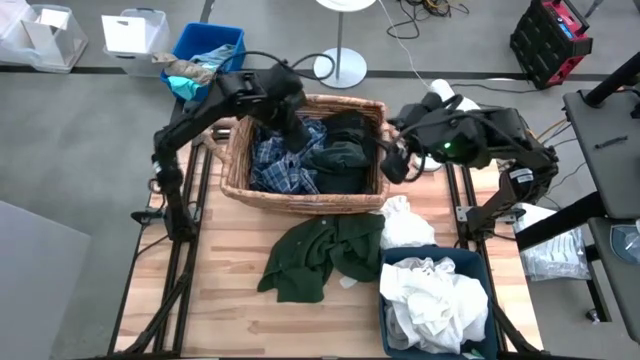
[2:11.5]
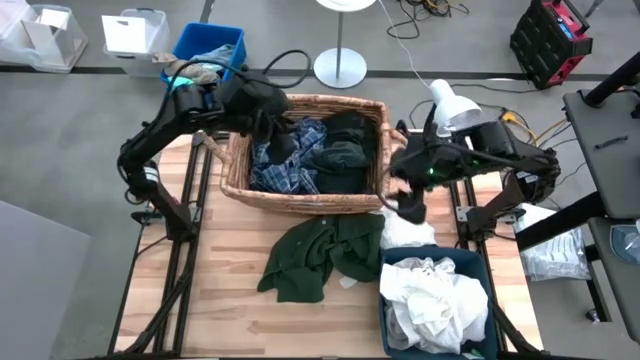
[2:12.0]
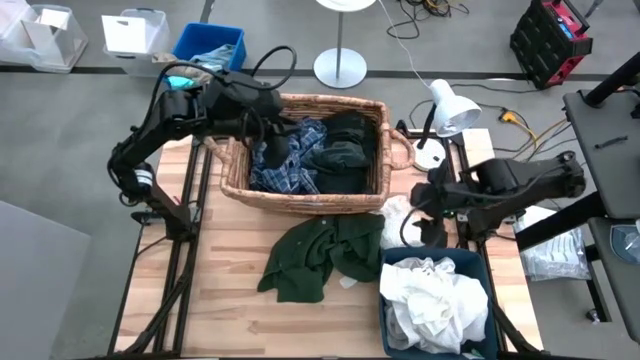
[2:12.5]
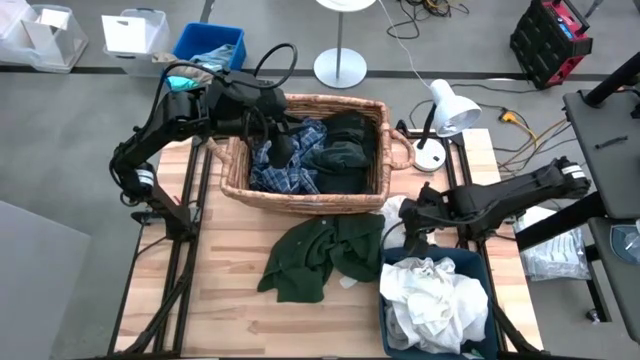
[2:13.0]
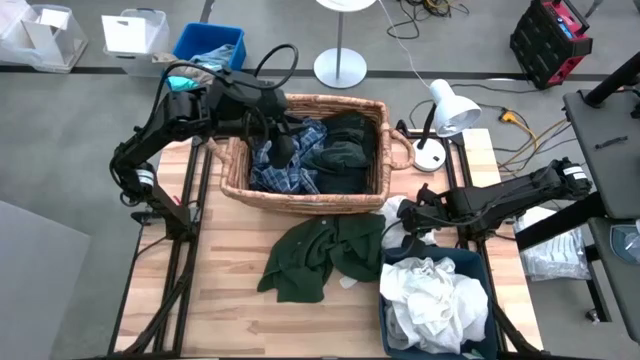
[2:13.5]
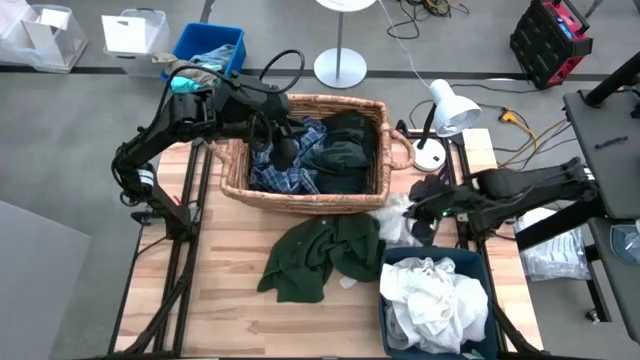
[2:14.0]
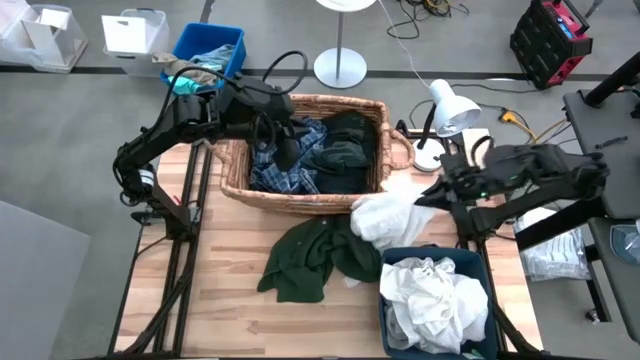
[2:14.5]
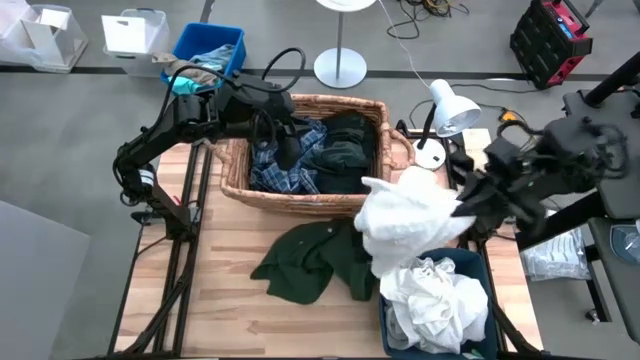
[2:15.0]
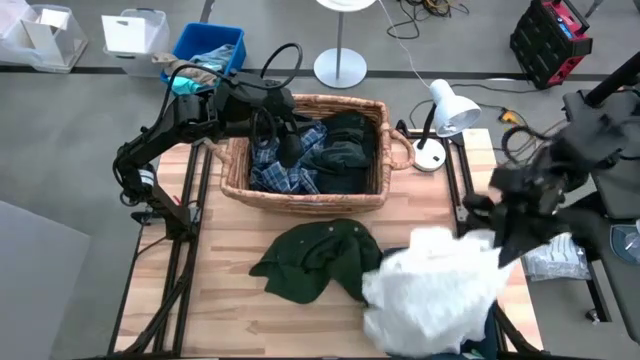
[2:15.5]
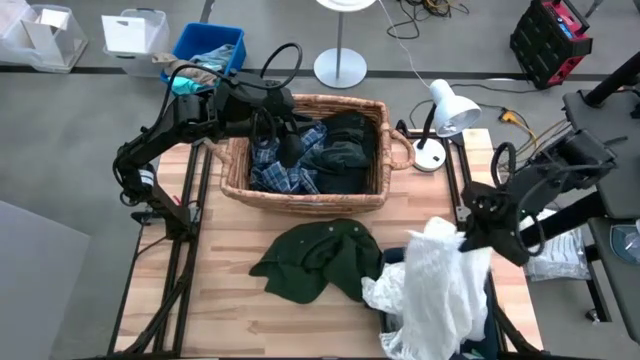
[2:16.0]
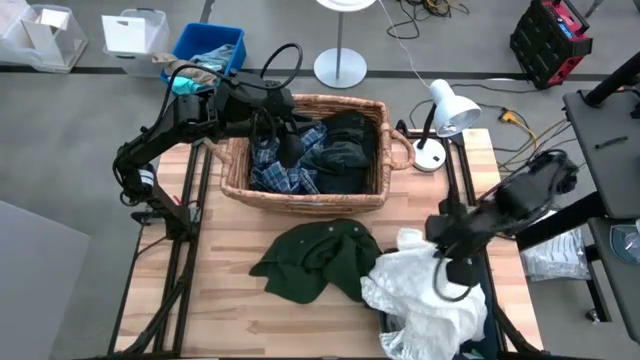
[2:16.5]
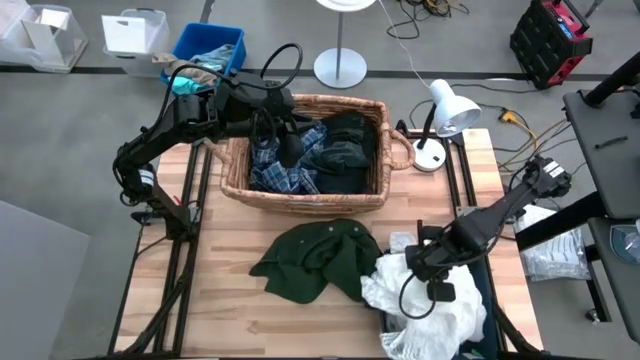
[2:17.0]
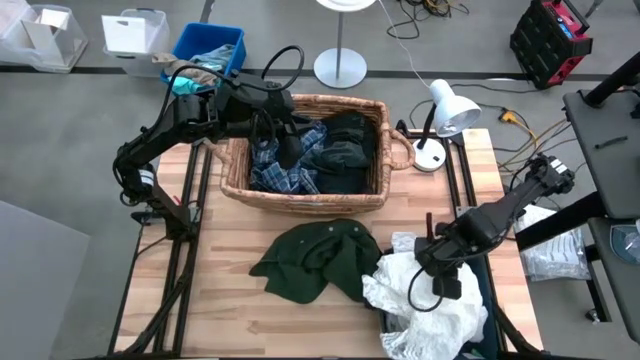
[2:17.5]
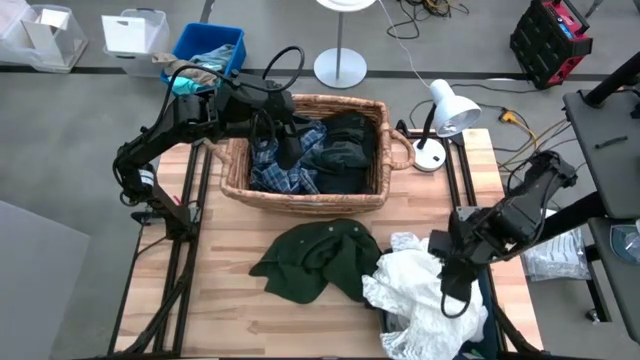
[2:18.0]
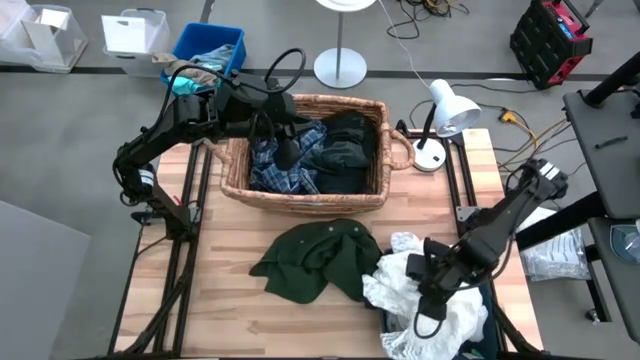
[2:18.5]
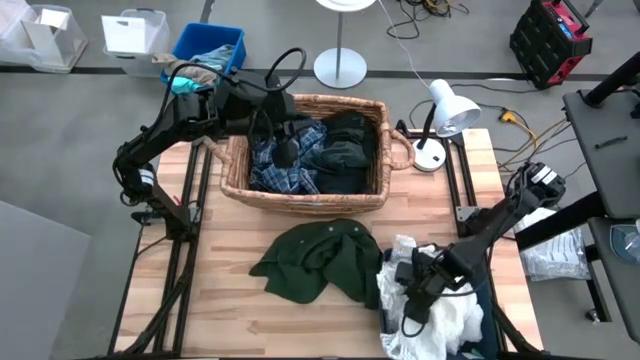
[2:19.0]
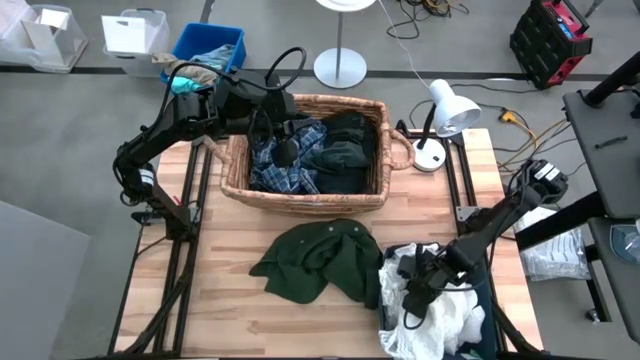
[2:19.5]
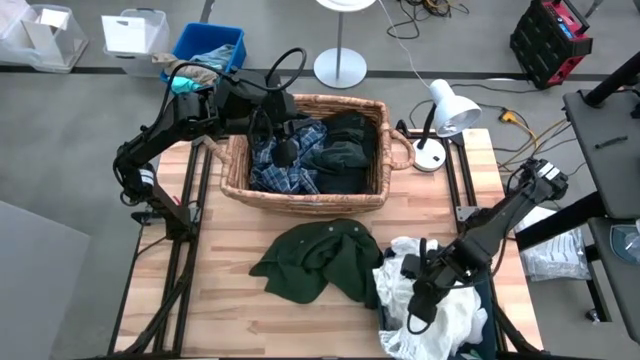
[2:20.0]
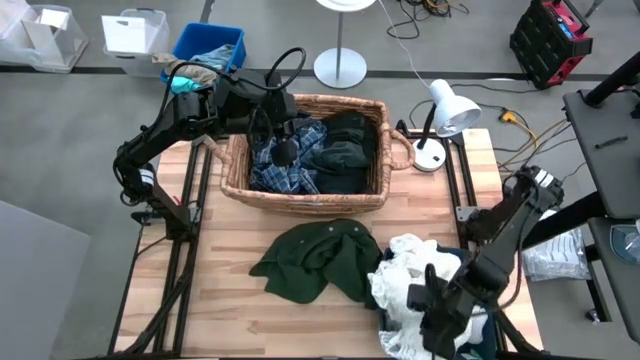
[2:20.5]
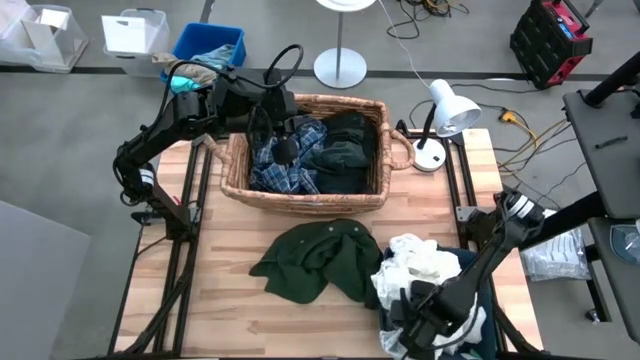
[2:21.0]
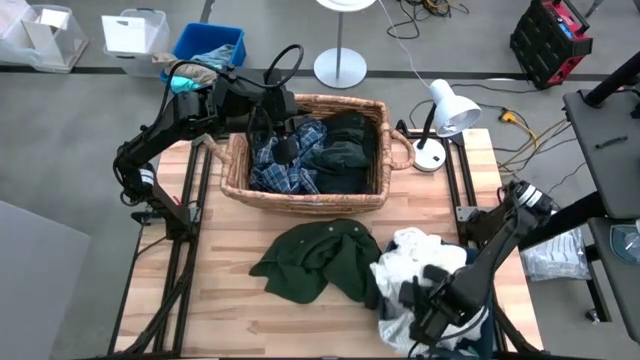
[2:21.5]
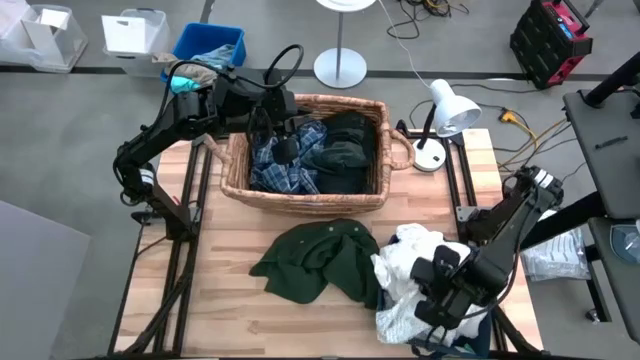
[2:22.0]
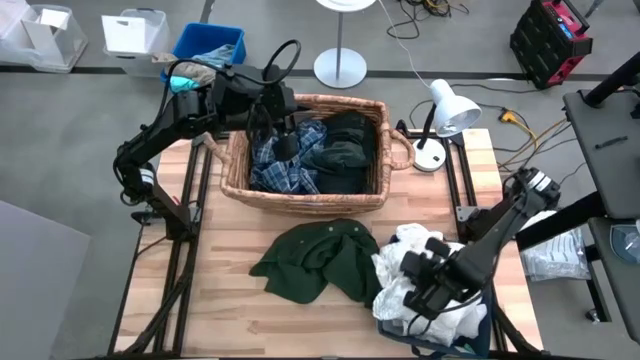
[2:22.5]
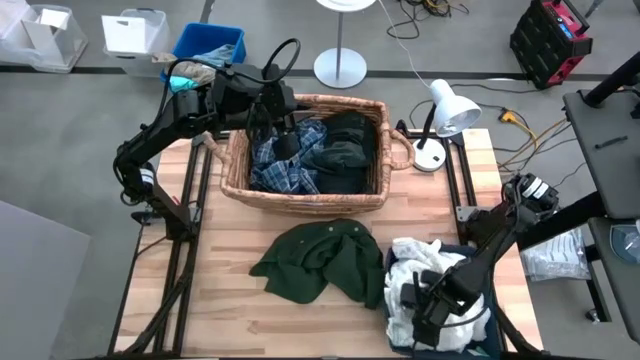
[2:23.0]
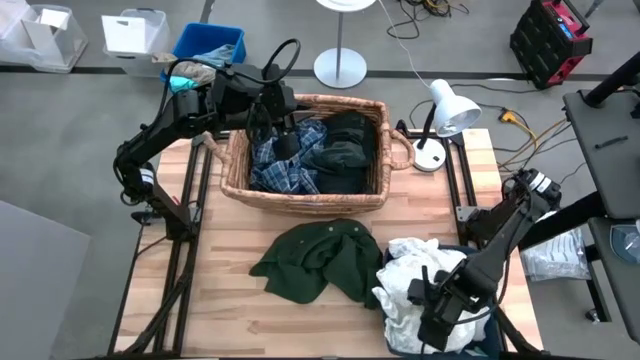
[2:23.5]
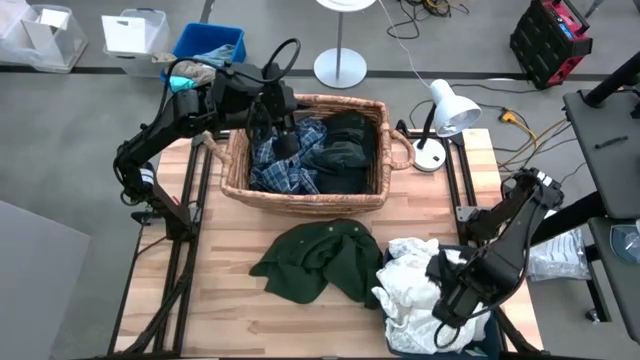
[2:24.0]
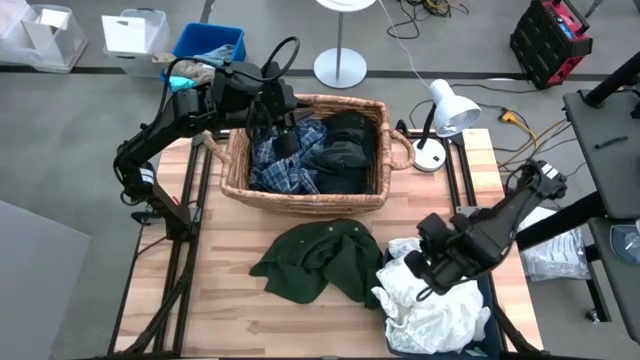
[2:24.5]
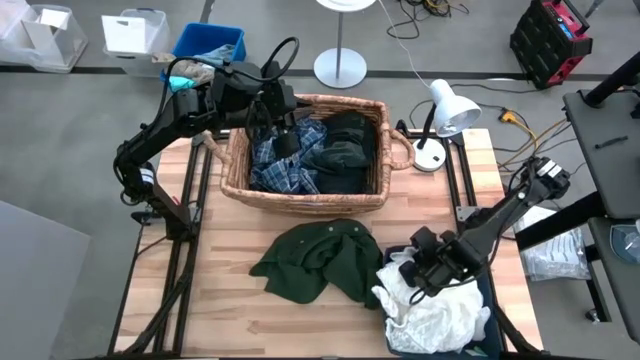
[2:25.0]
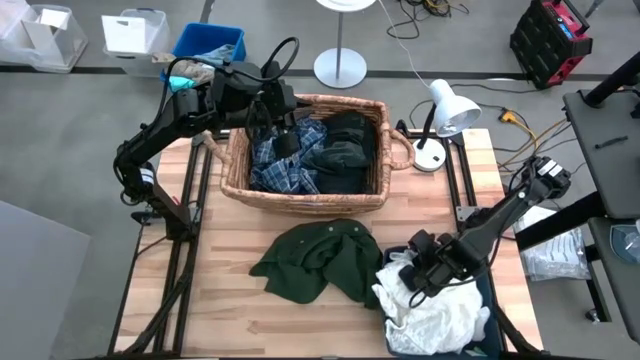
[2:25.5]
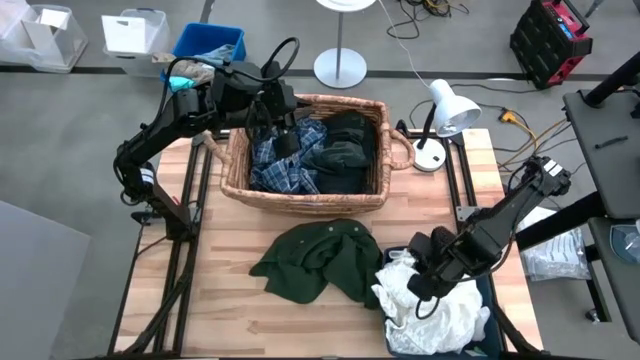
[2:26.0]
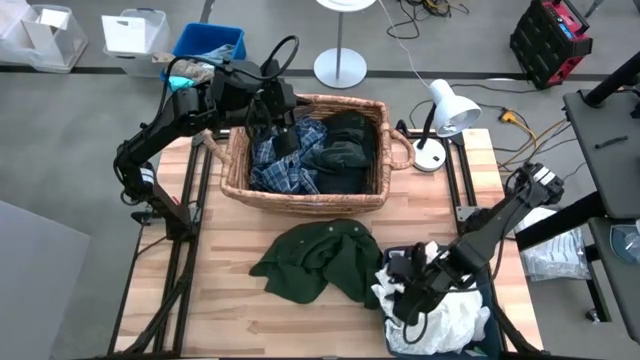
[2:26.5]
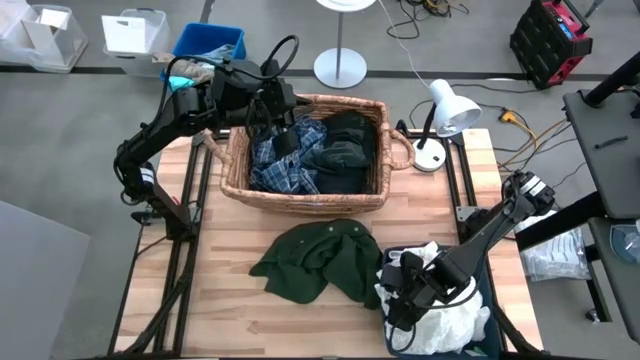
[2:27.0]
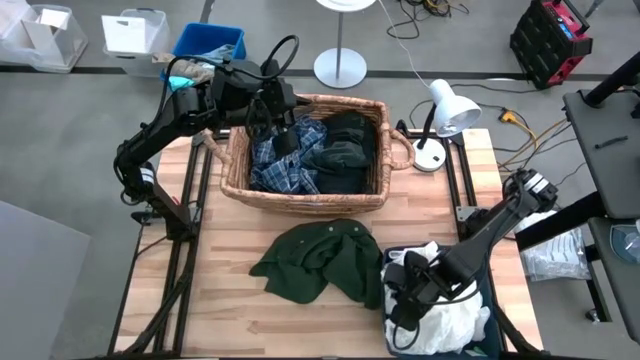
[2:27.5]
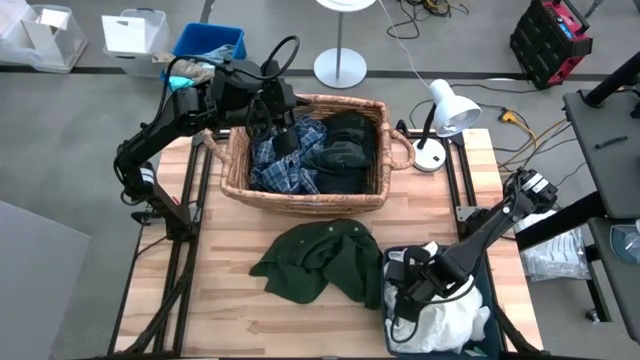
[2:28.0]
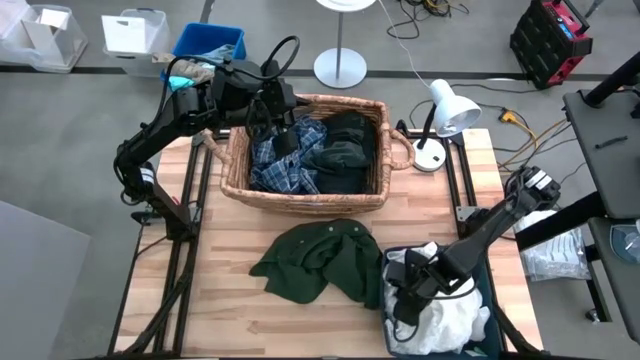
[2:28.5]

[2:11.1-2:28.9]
Task: Sort clothes
Put the white dress into the blue laundry bin

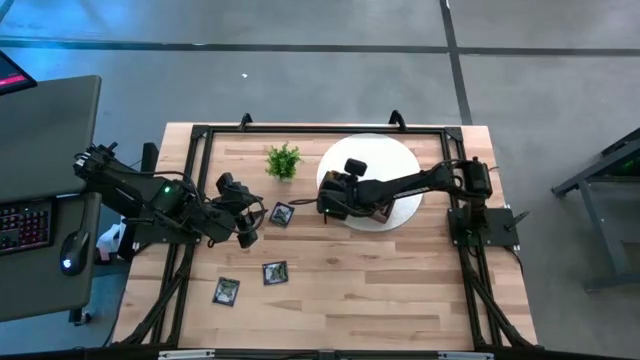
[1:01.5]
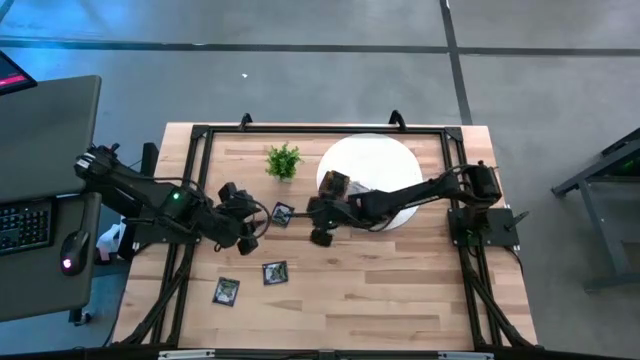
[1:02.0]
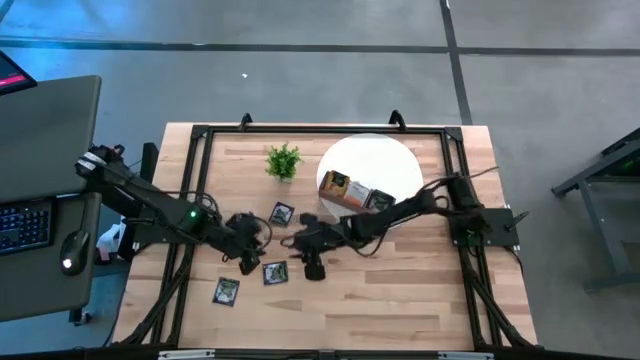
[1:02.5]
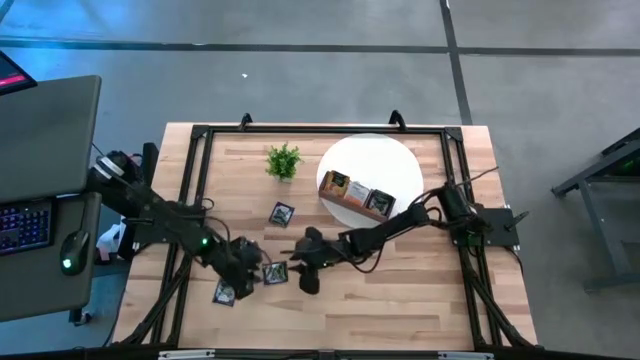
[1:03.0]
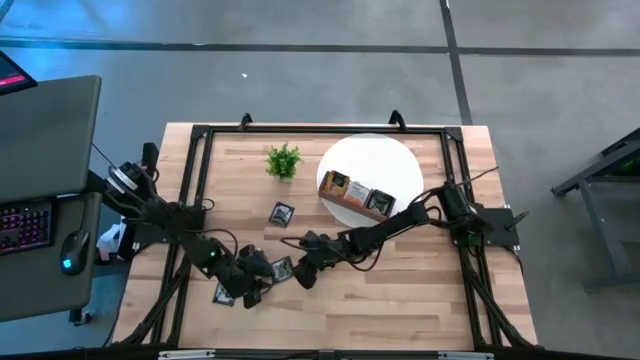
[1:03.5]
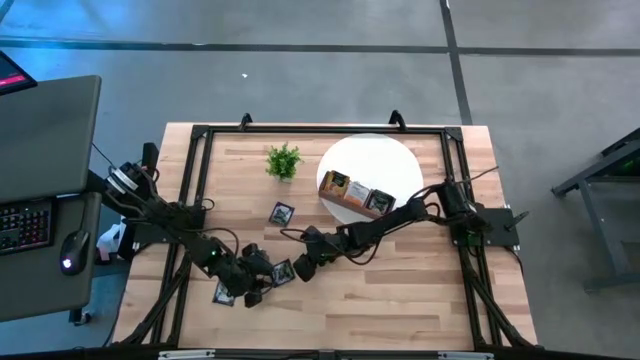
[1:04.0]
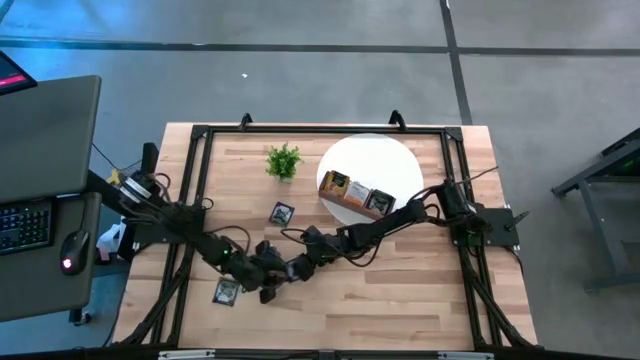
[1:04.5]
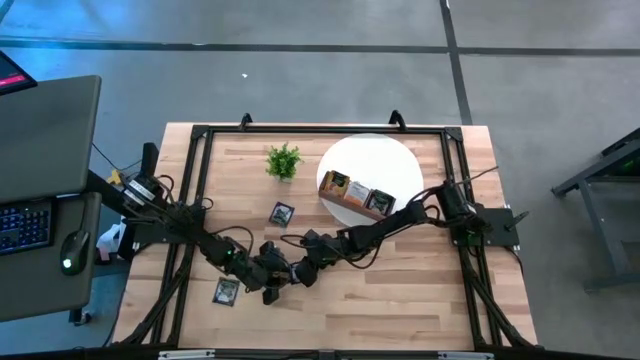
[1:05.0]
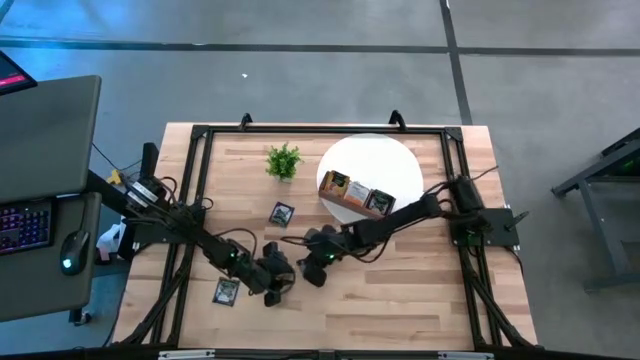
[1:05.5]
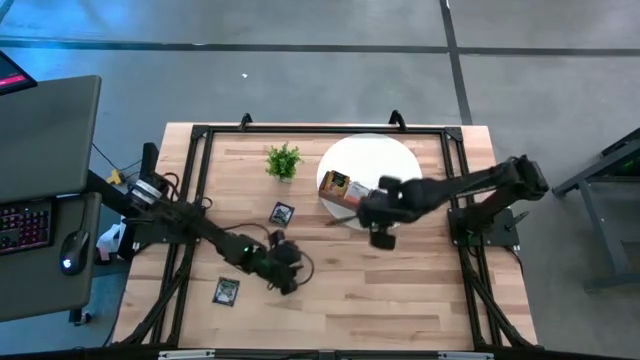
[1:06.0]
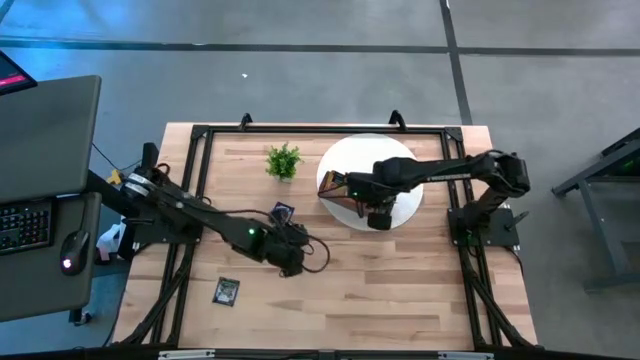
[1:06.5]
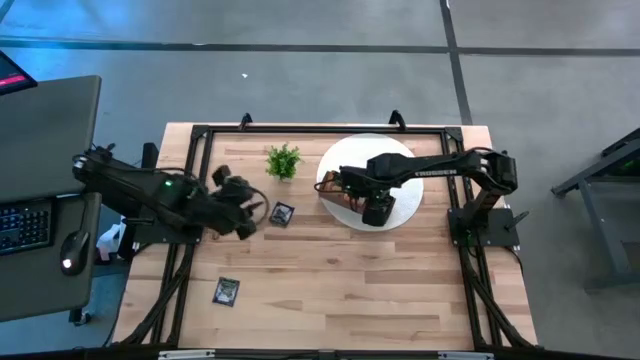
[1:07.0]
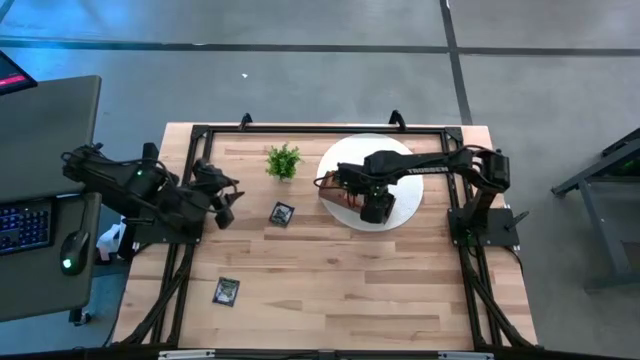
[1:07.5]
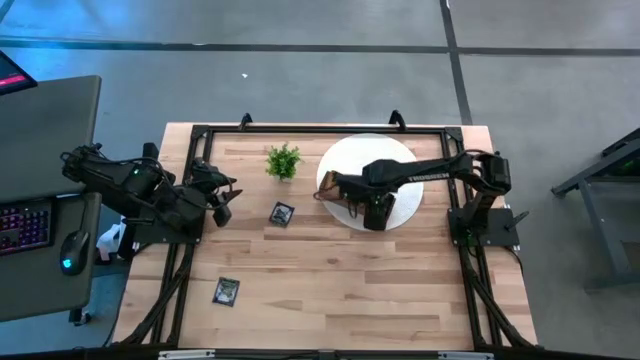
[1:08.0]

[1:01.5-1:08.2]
Task: Pick & Place Tea
Put the purple tea bag into the right compartment of the wooden organizer
